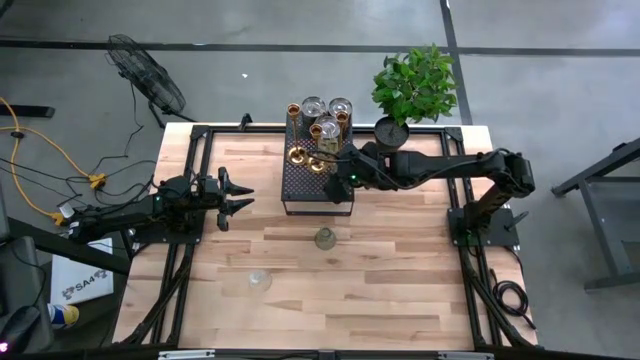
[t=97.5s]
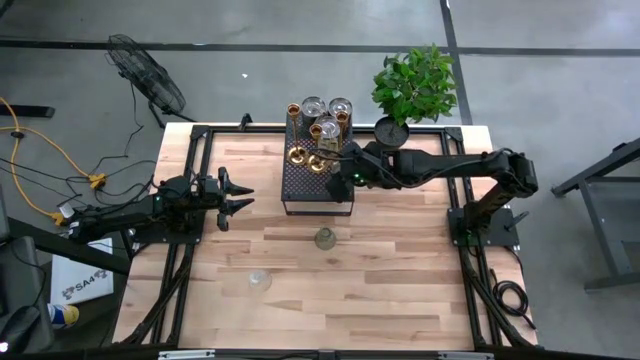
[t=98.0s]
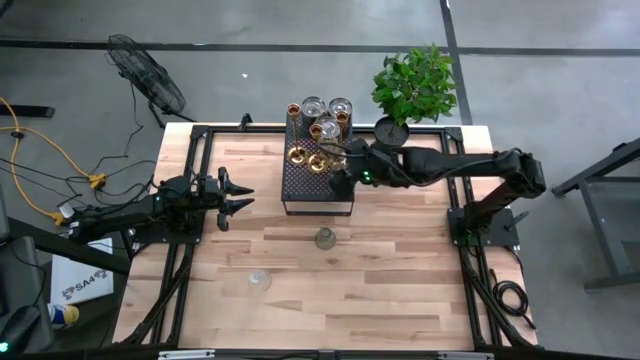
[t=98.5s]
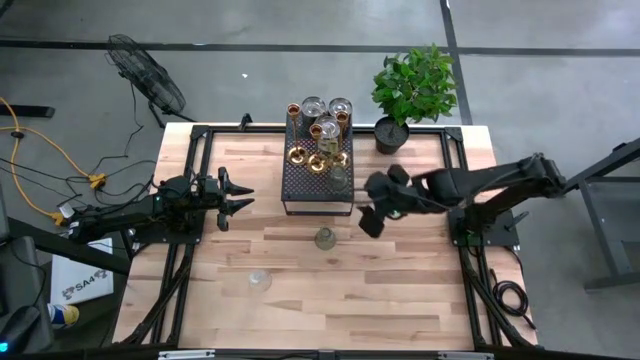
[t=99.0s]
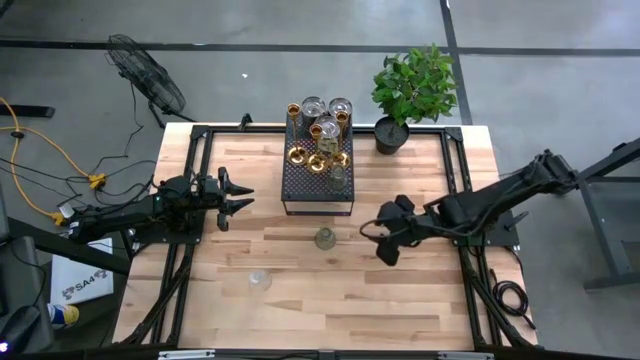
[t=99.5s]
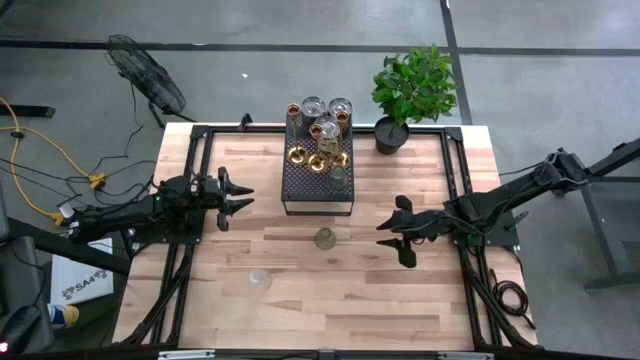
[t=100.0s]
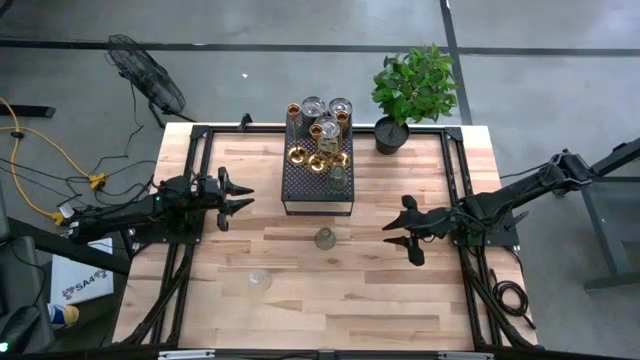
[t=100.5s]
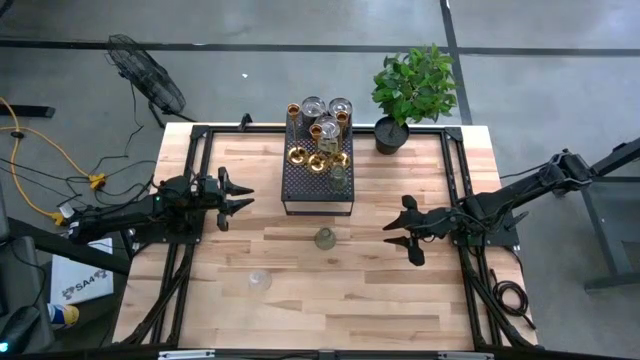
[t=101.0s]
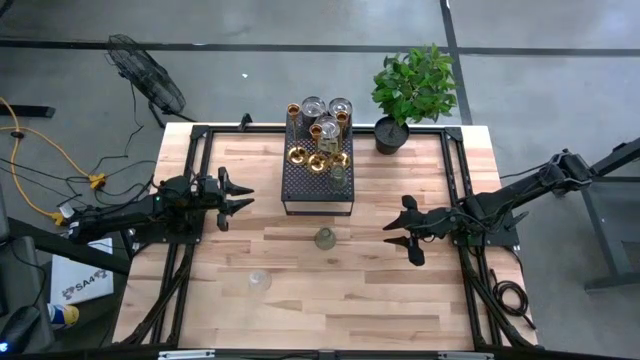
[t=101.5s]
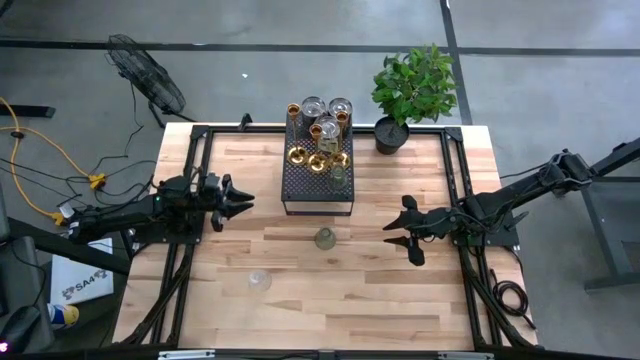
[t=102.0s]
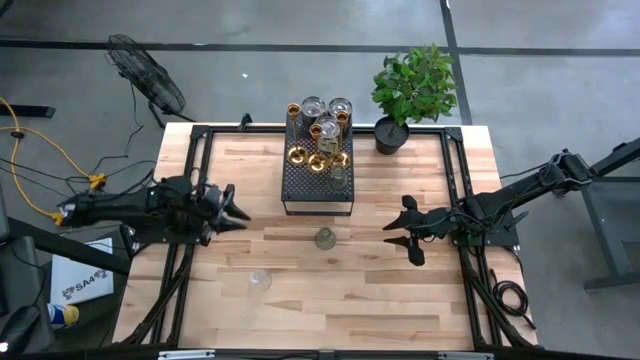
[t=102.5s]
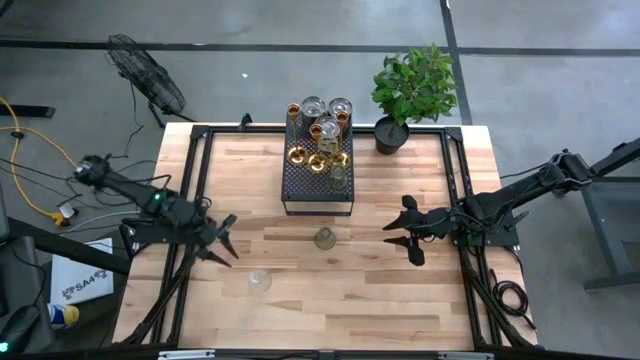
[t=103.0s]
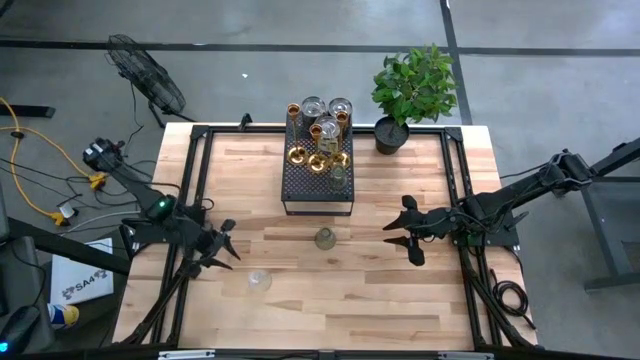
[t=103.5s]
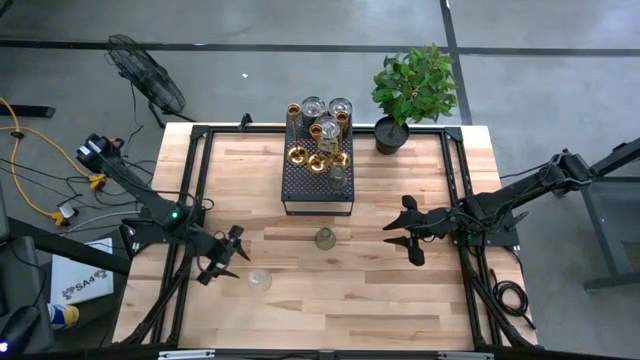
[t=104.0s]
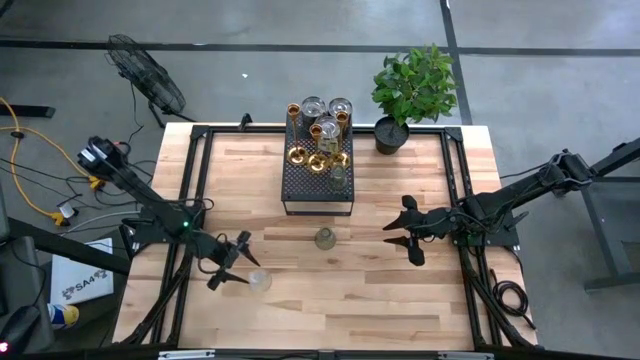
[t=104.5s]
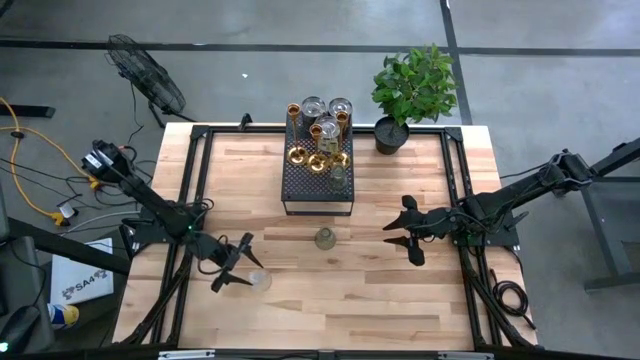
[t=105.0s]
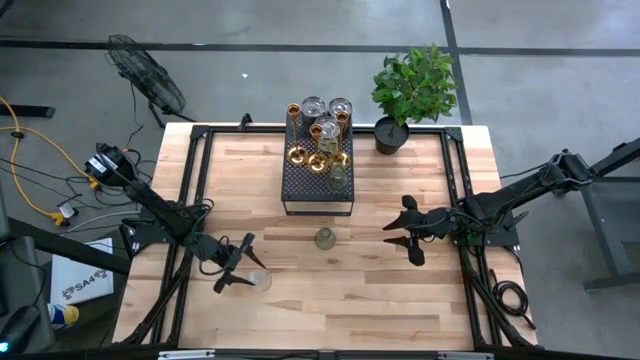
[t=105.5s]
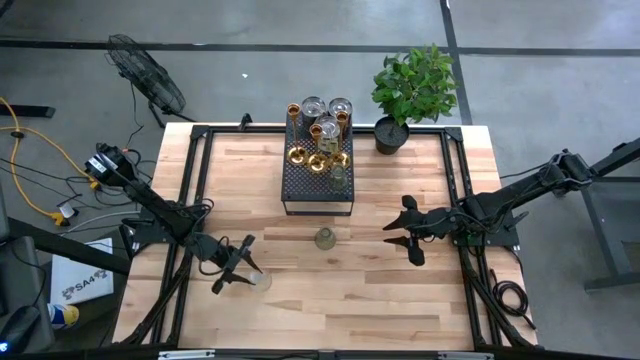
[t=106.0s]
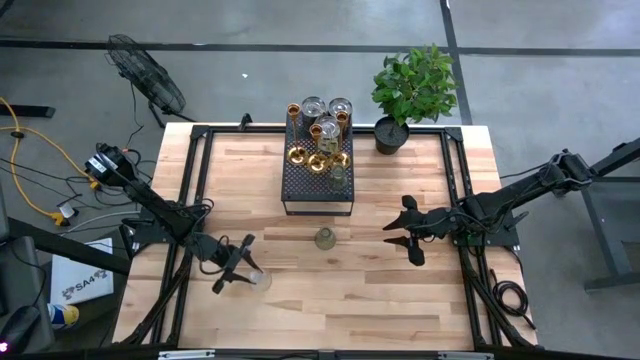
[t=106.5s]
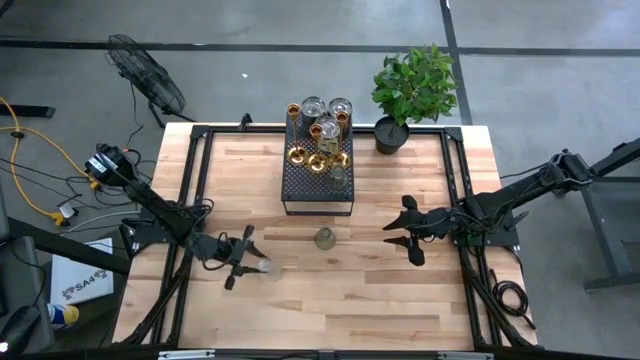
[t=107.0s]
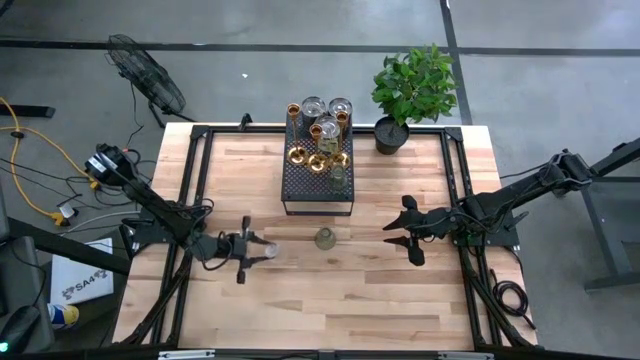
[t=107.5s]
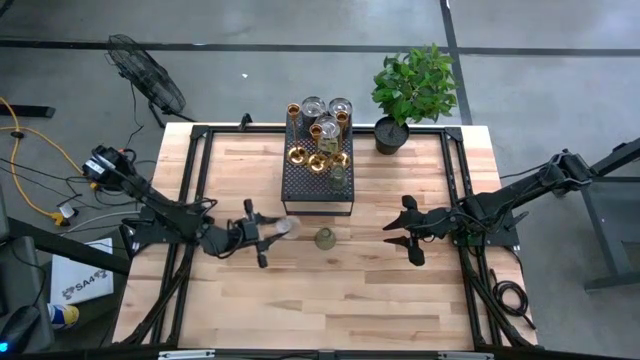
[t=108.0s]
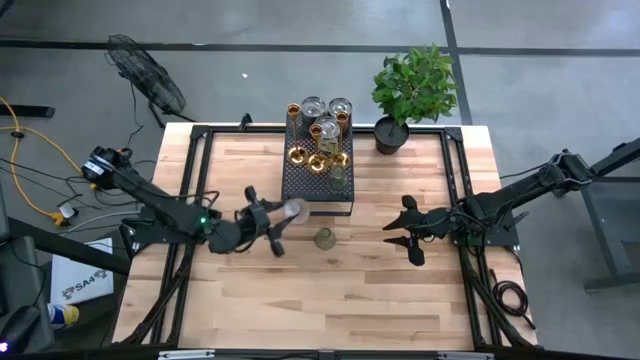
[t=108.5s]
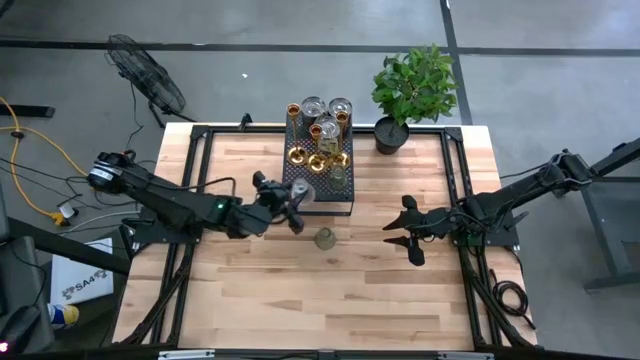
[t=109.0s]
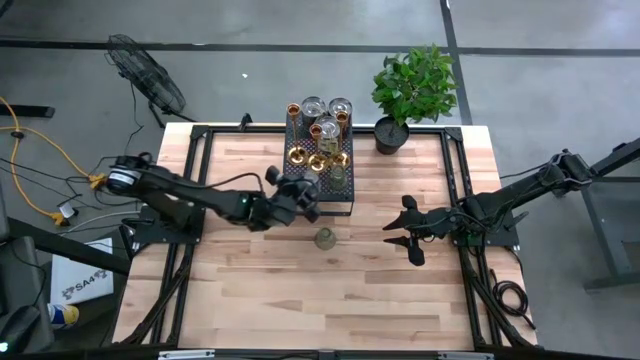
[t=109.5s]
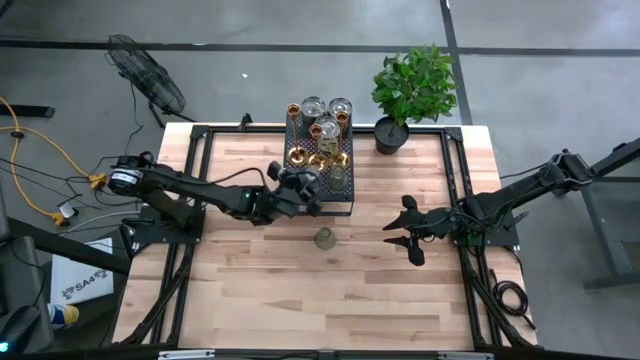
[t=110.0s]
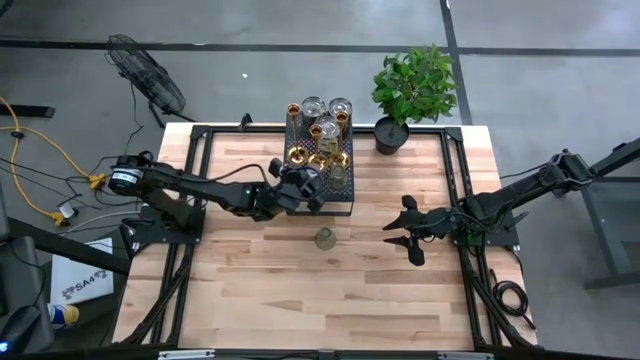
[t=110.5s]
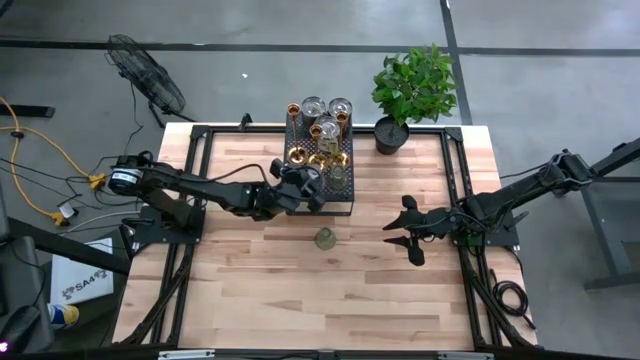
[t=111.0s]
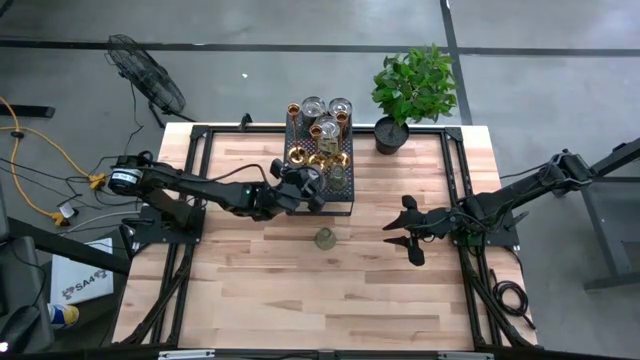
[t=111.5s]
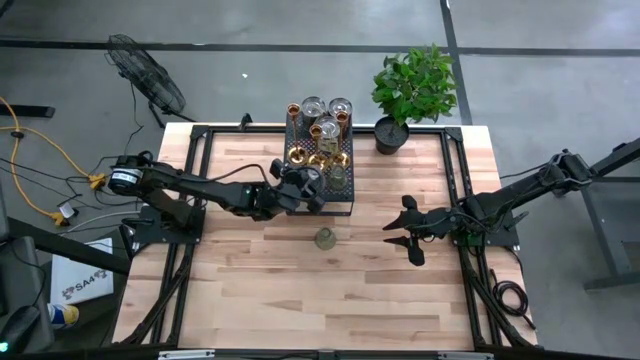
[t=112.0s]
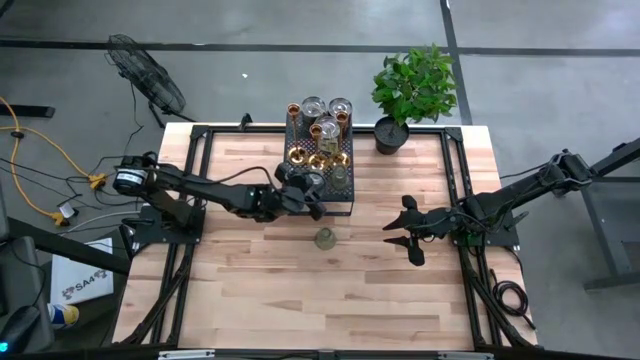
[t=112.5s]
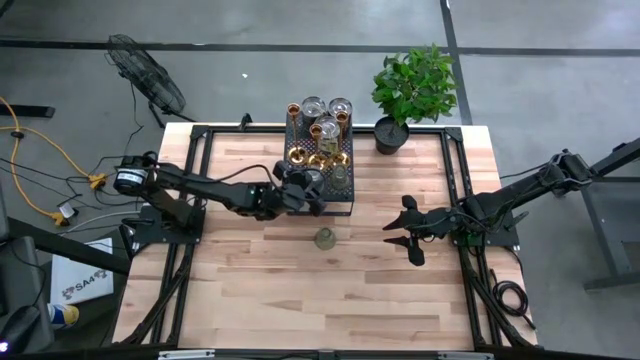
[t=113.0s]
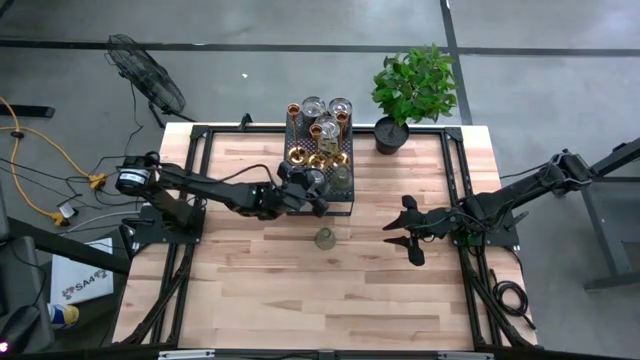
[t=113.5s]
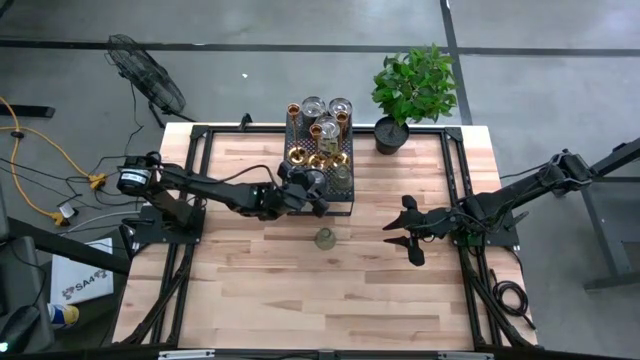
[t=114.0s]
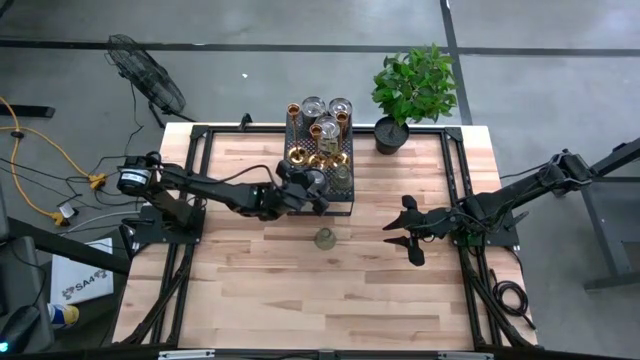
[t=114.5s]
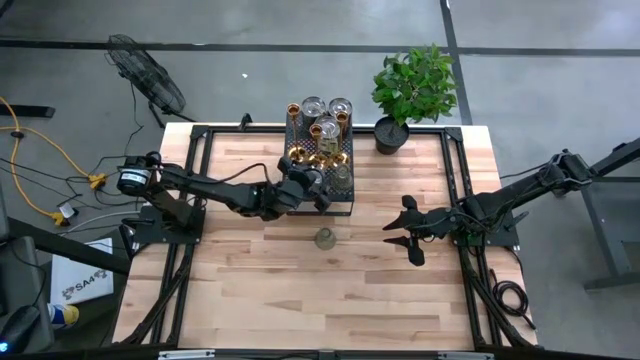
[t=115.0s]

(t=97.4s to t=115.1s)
Task: Pick & Place candle stick holders
Put the transparent candle holder on the shelf

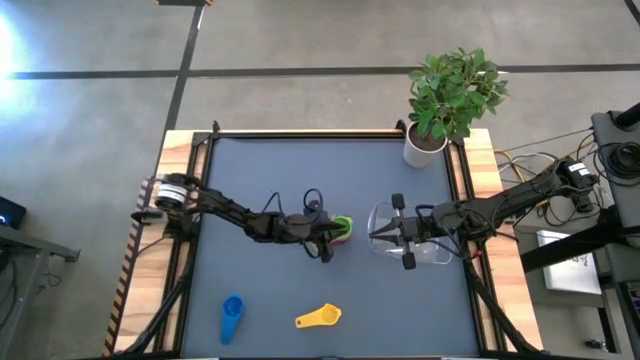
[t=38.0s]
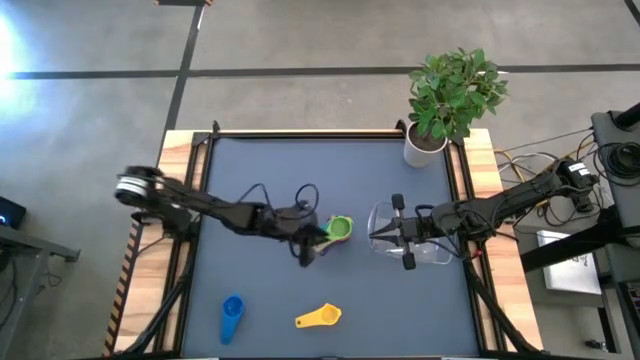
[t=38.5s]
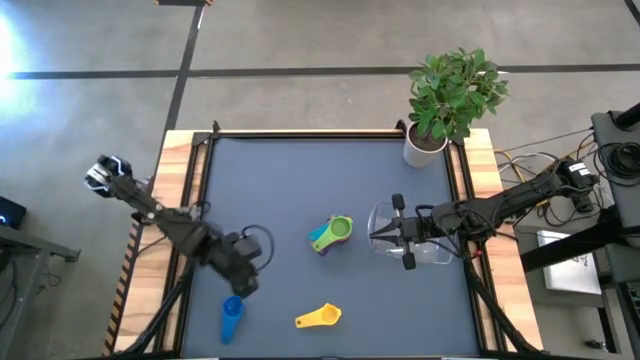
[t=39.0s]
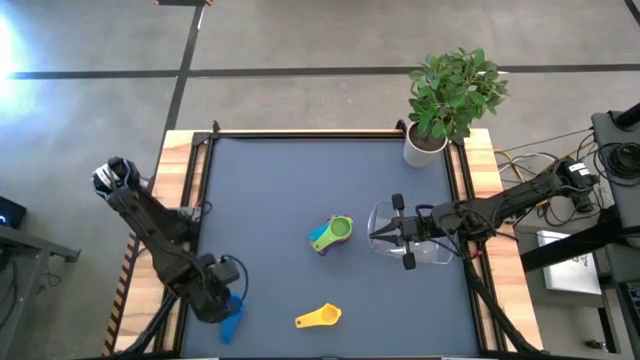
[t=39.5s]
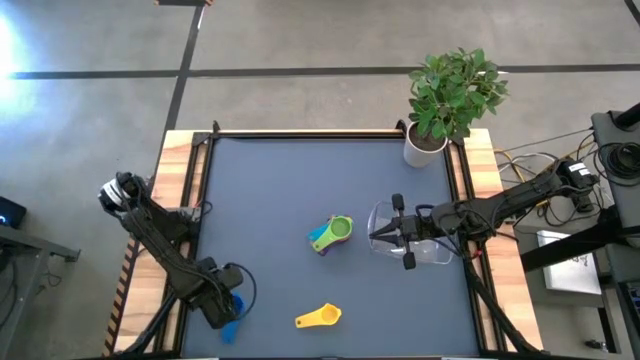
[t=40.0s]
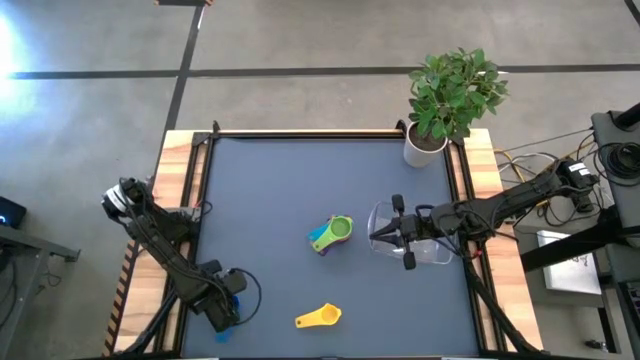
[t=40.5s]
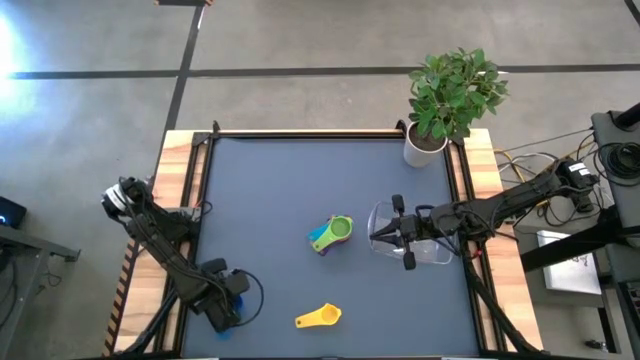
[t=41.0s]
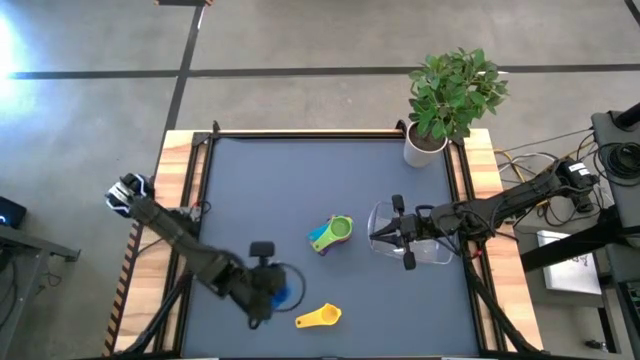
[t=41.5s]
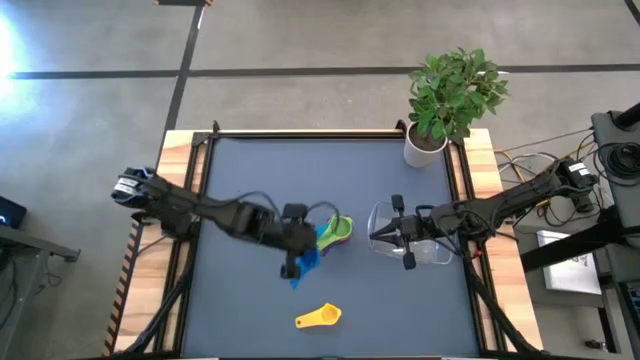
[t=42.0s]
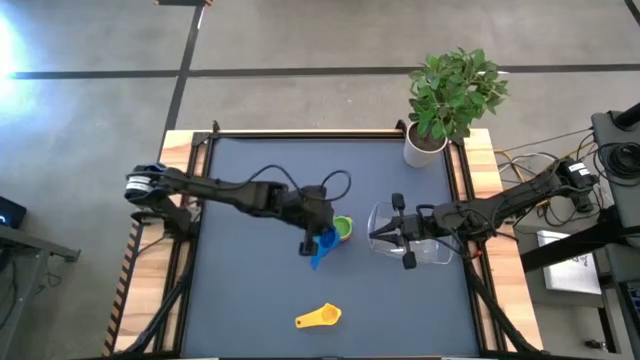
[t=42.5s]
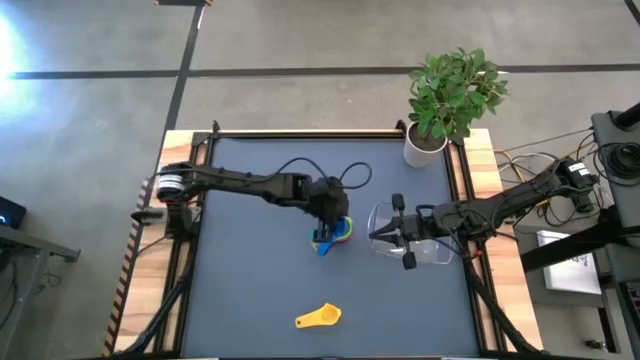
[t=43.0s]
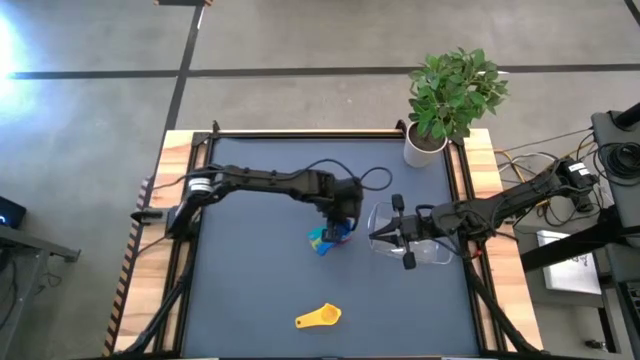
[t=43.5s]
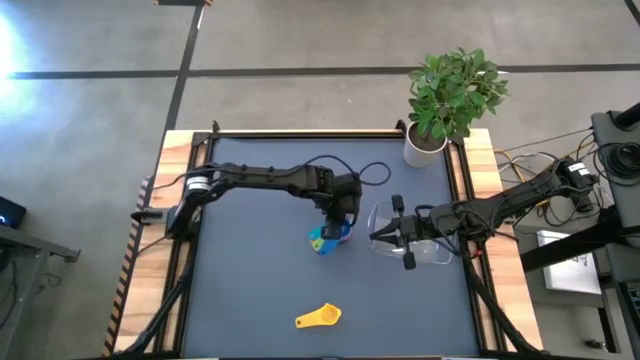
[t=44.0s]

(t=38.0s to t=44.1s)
Task: Nest measuring cups in basket
Stack the blue measuring cup on the green measuring cup
